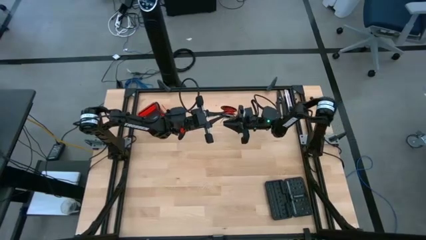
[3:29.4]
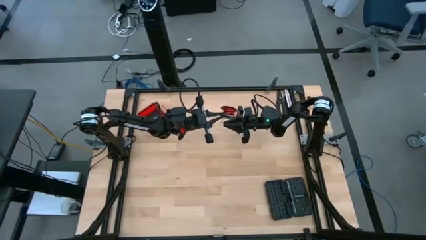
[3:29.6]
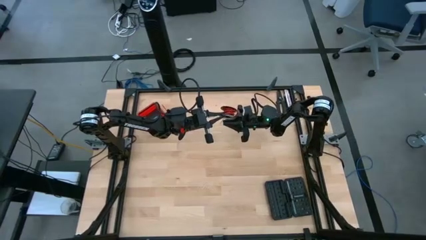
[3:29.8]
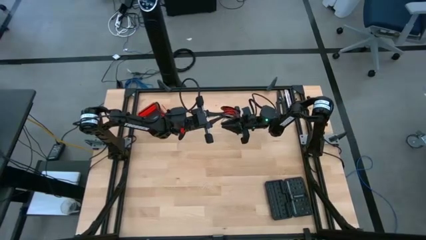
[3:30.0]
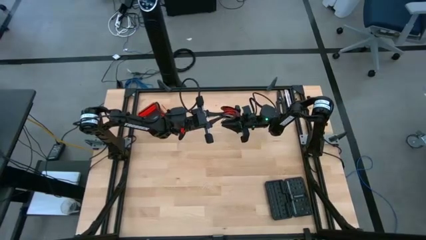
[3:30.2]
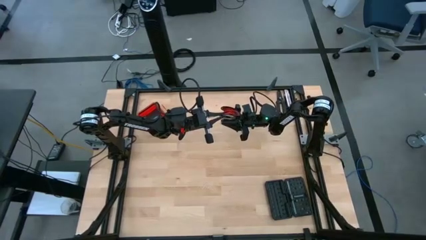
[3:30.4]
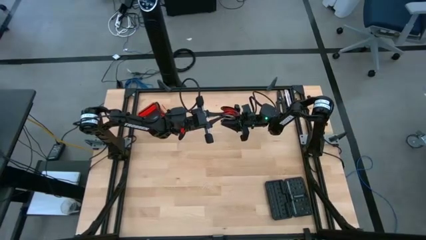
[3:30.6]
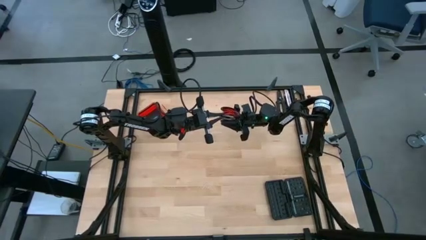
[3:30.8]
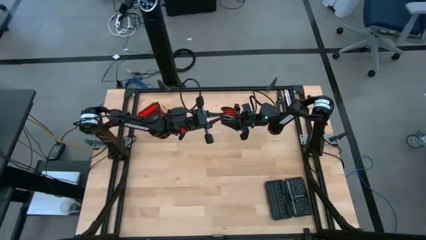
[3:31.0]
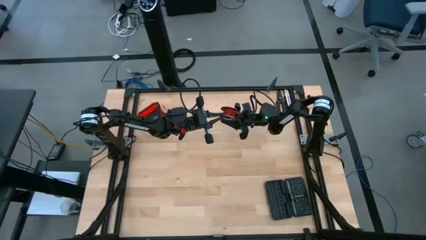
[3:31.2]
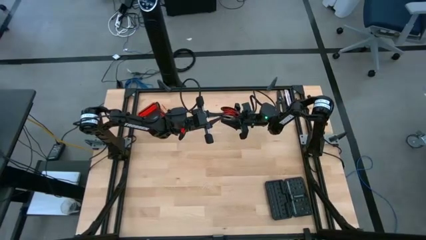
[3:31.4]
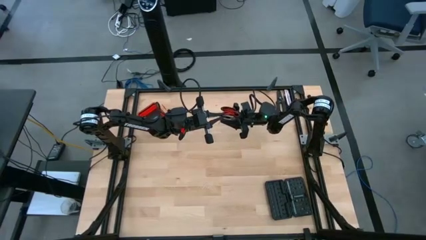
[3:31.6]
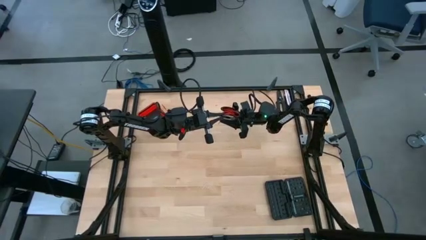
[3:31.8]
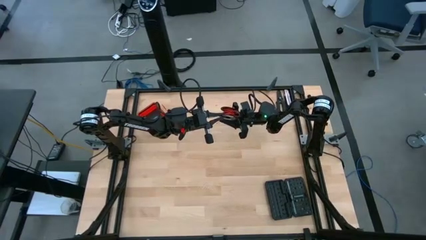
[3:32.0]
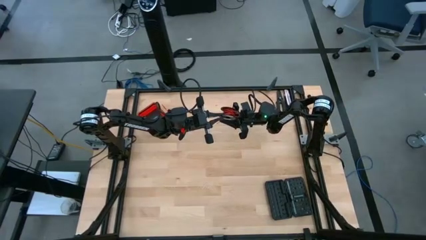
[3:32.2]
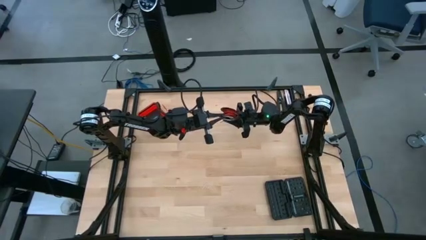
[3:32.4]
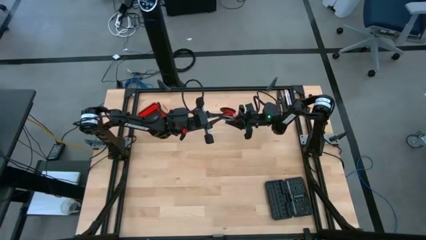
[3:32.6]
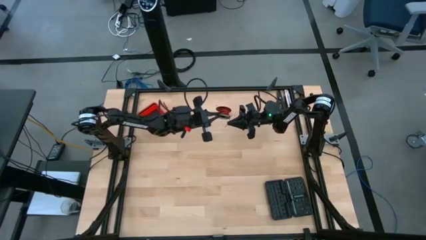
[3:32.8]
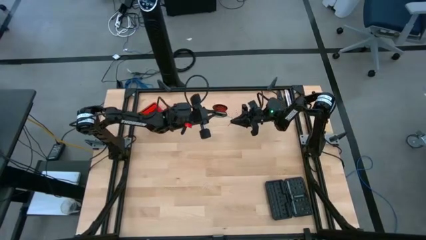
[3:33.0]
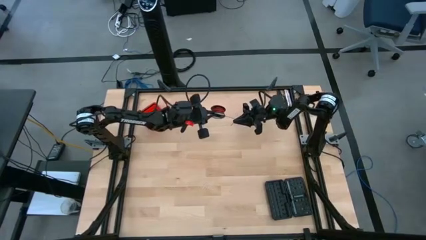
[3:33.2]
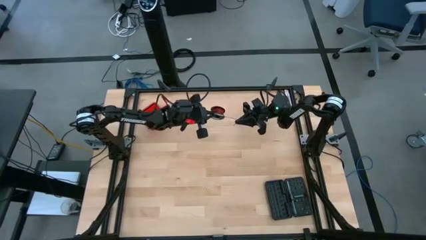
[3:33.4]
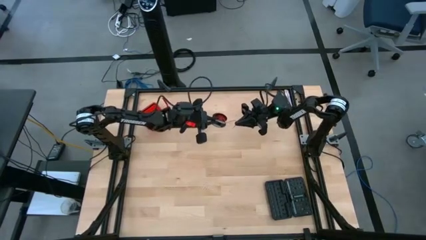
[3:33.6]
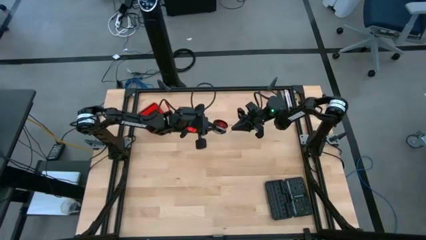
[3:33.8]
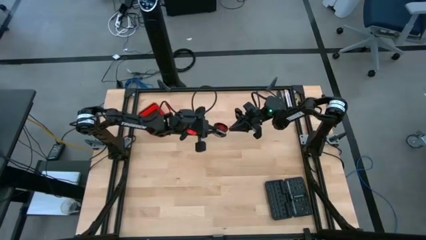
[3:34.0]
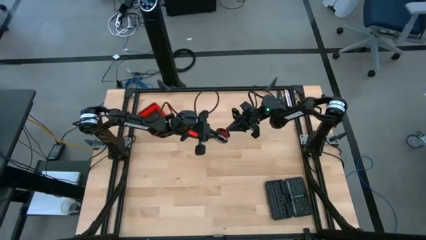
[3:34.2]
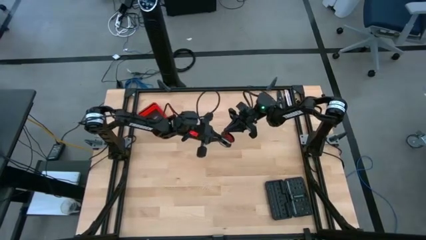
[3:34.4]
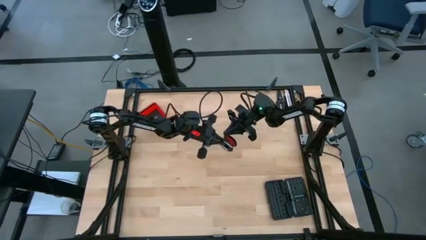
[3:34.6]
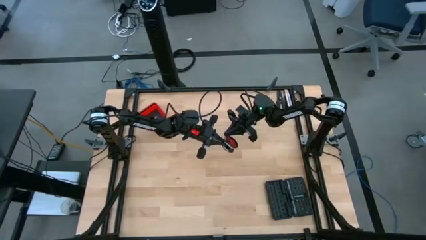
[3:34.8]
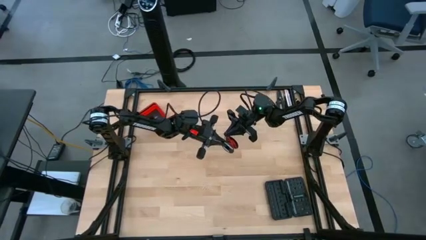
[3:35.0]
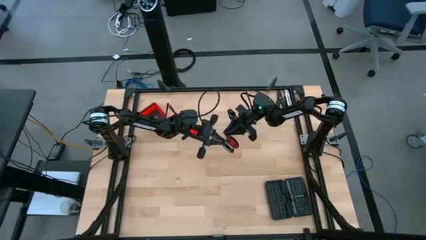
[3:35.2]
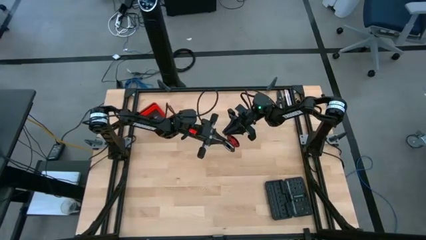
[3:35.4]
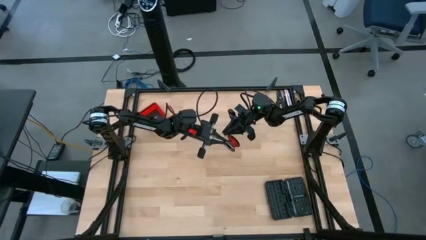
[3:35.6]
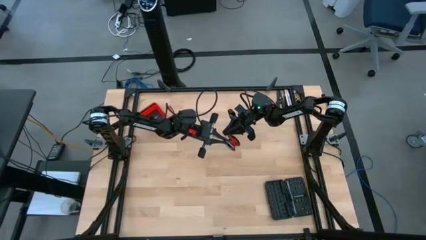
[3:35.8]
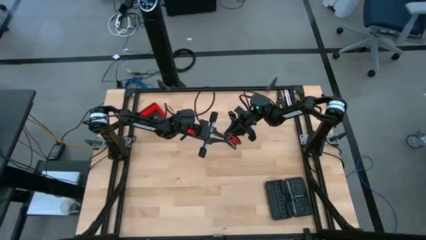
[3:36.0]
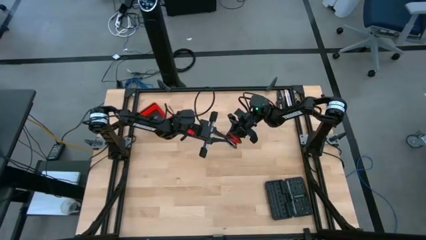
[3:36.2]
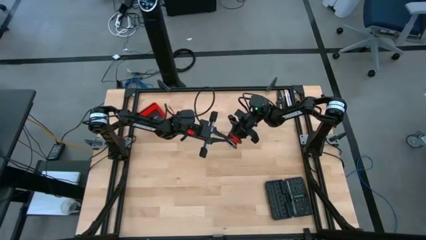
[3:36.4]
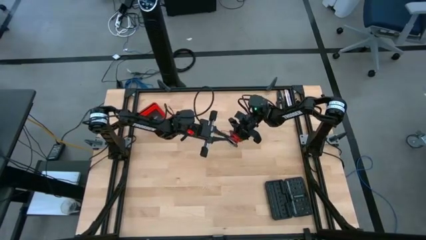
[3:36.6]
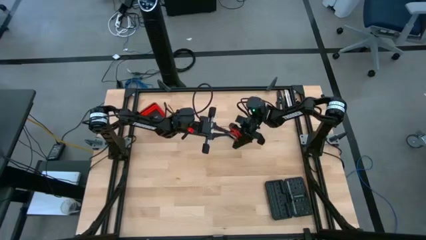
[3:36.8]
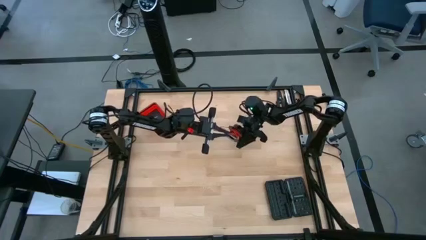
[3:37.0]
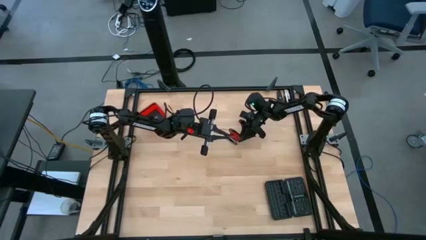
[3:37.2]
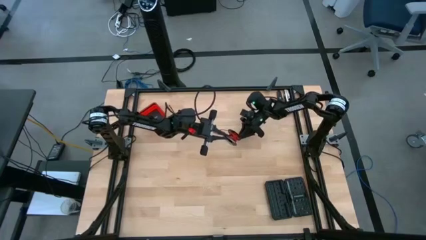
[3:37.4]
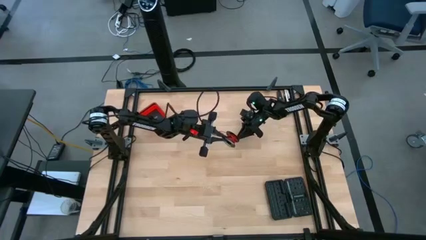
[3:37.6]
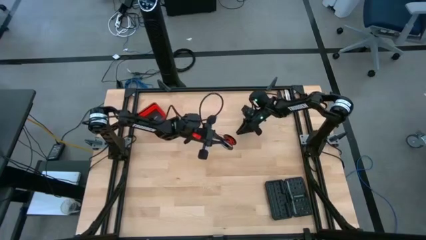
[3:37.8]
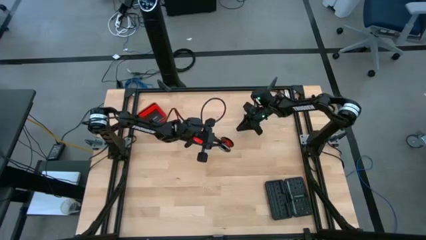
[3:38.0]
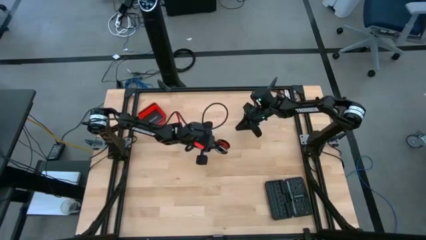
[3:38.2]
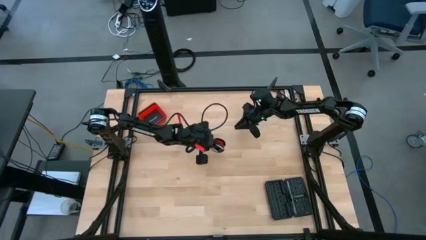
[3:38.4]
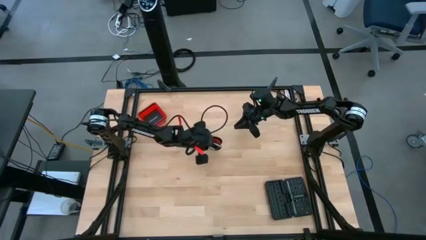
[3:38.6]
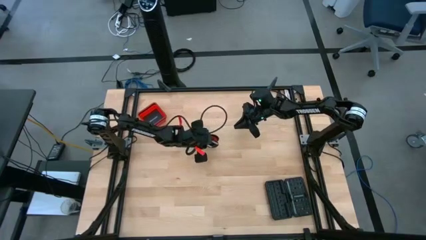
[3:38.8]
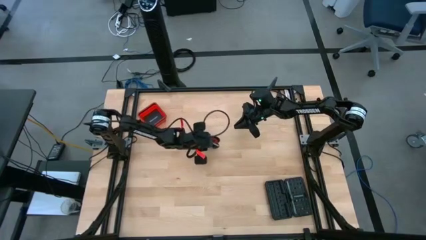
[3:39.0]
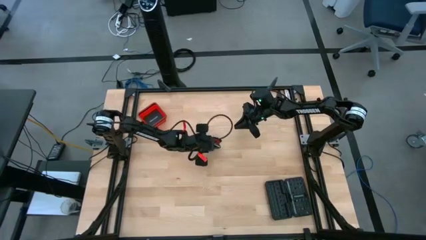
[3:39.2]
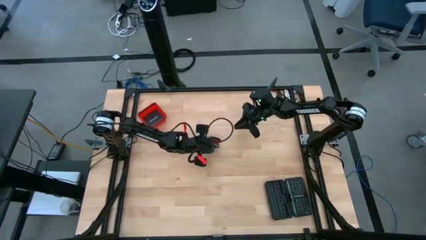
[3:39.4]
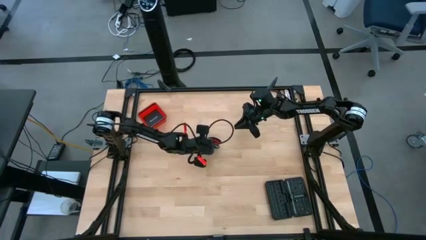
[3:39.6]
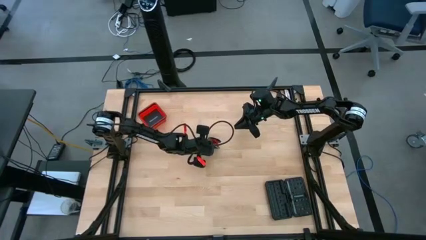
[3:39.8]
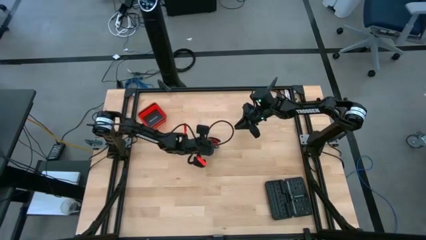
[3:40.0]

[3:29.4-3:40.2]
Task: Coil cords
Coil the wire to the spool

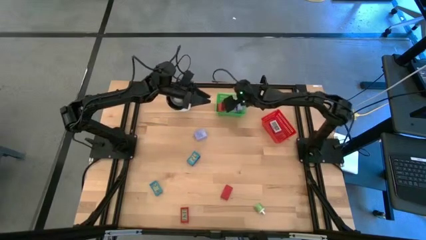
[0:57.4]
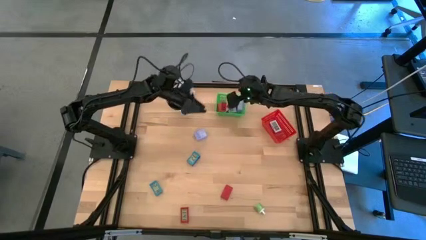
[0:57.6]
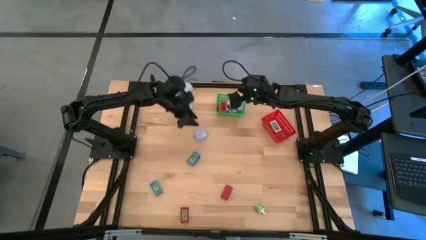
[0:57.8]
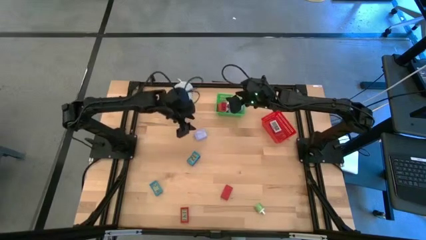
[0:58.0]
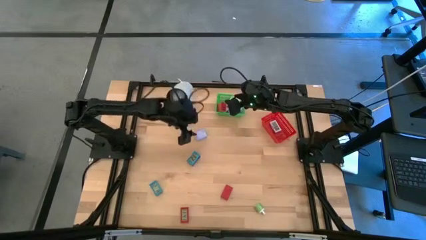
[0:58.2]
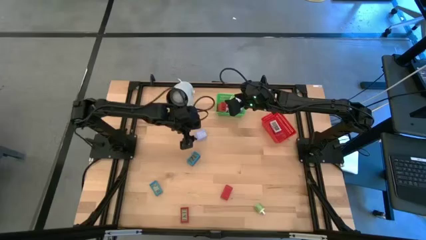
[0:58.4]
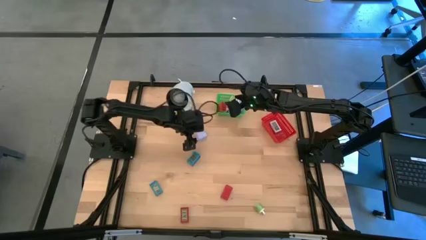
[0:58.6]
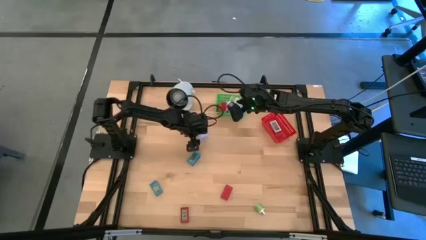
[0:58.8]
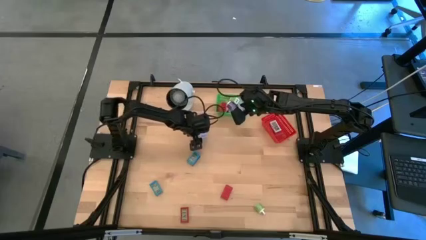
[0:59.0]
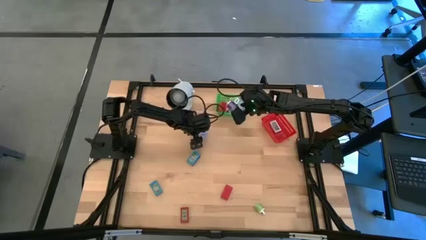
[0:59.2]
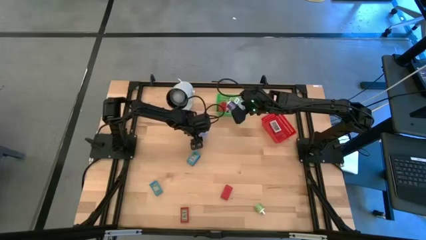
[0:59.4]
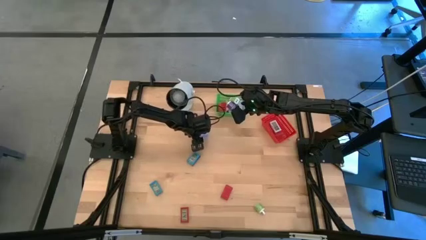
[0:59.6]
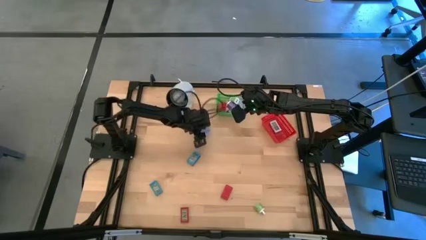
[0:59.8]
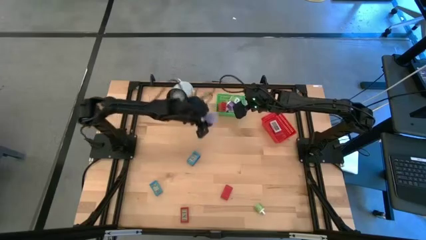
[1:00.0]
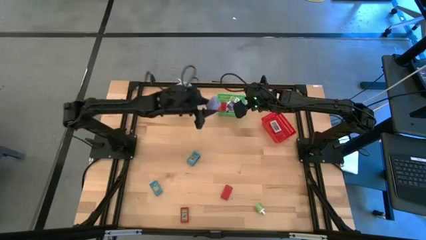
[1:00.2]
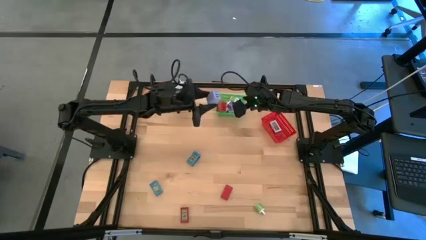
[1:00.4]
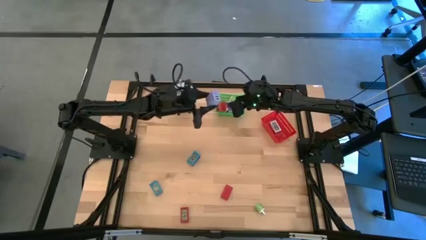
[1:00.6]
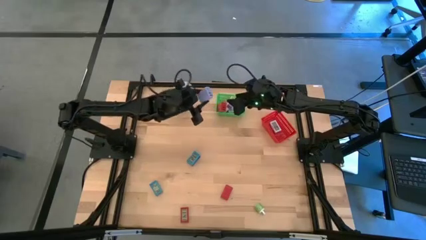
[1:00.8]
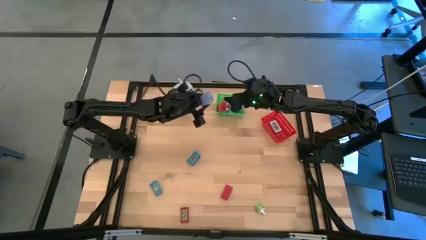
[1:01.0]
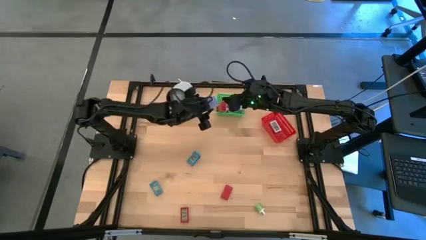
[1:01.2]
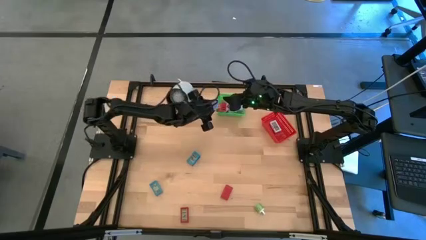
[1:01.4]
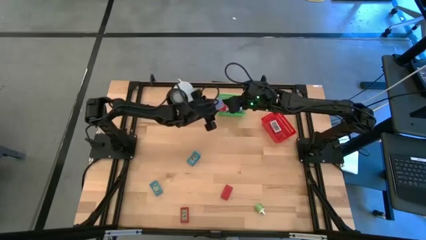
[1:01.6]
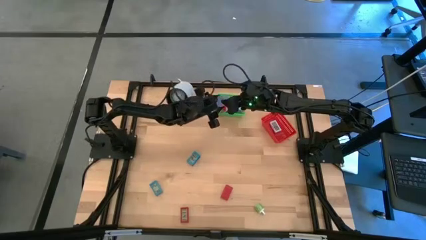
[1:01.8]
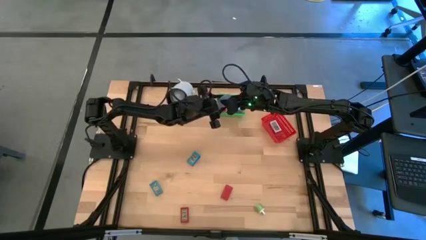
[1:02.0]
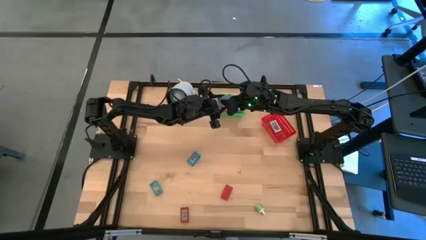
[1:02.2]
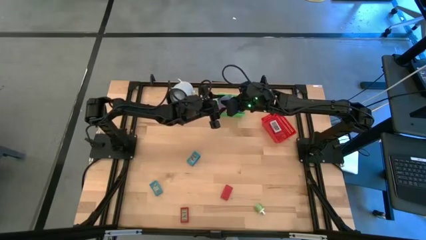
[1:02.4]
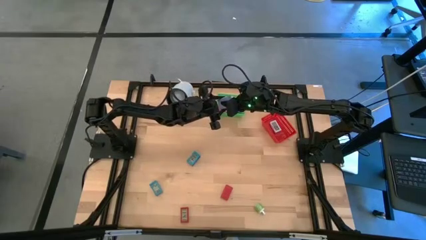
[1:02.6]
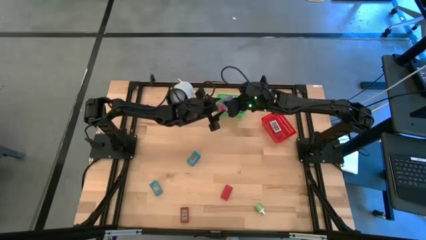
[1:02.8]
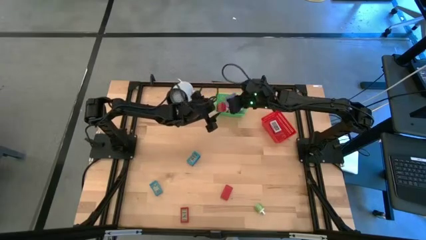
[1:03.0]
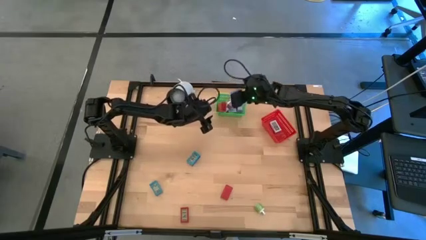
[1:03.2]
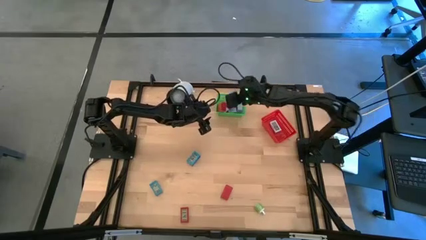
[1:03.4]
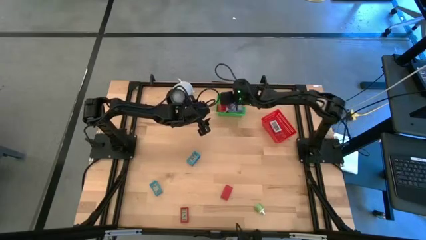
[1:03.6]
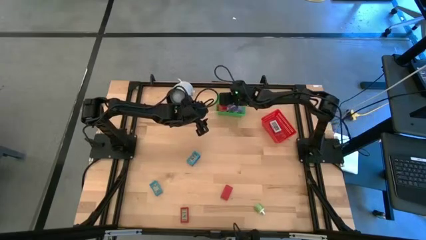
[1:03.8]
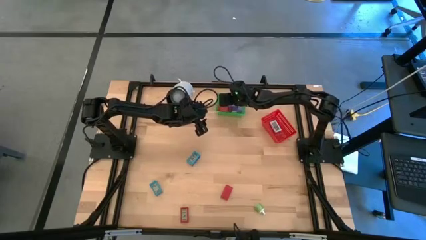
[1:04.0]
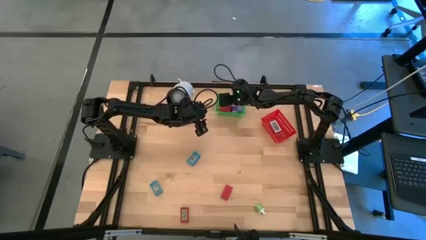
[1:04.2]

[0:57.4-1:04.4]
Task: Pick & Place Office items
Put the light blue charger adapter into the green bin
